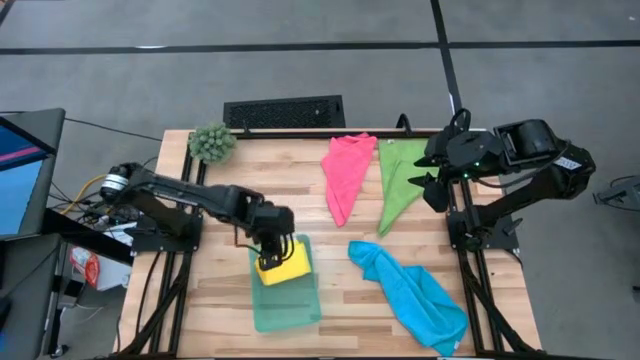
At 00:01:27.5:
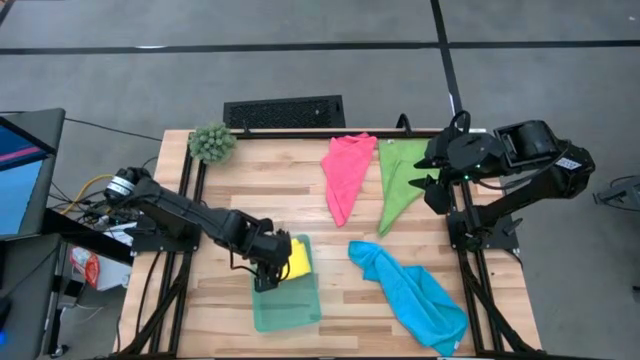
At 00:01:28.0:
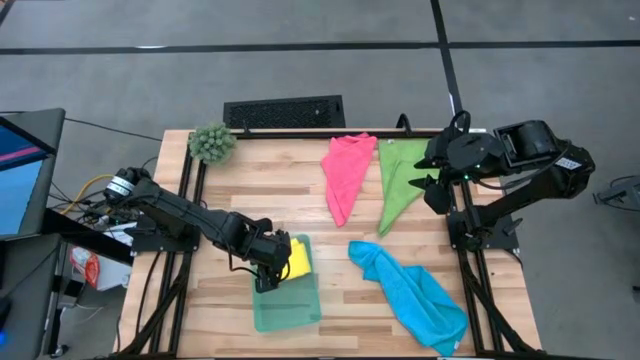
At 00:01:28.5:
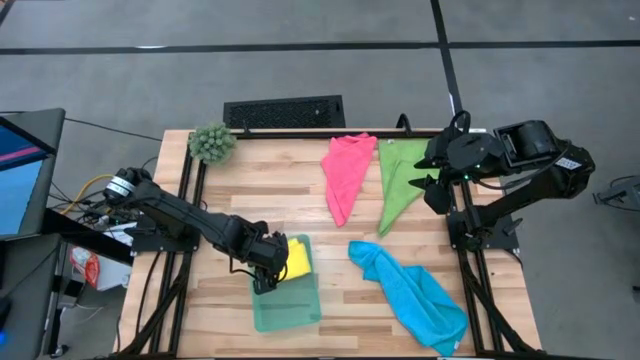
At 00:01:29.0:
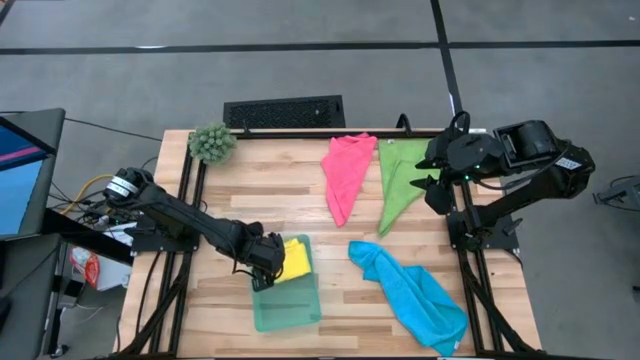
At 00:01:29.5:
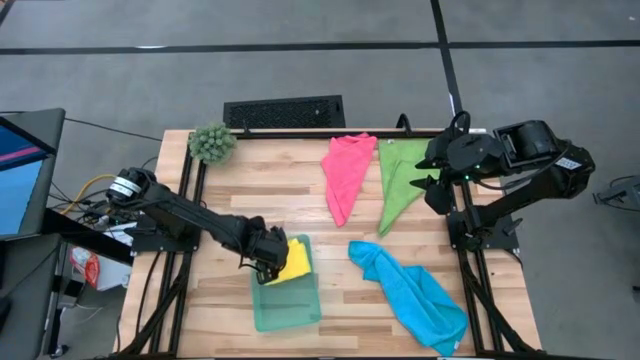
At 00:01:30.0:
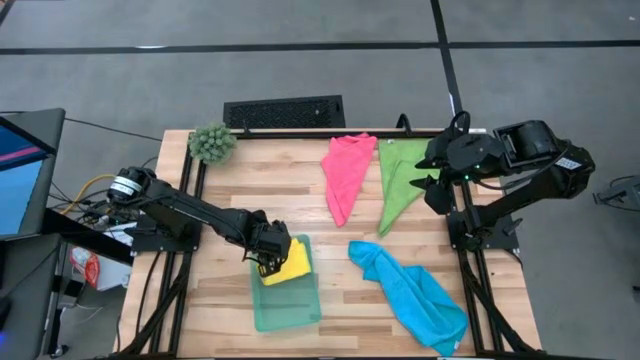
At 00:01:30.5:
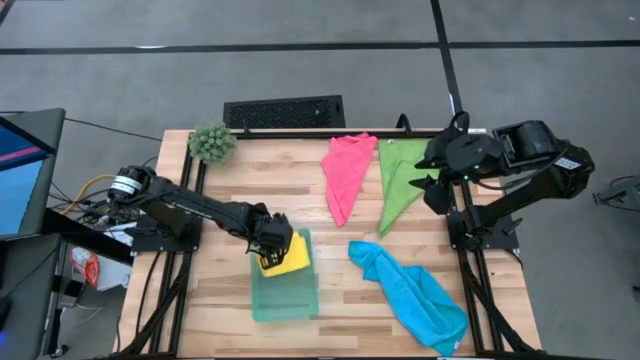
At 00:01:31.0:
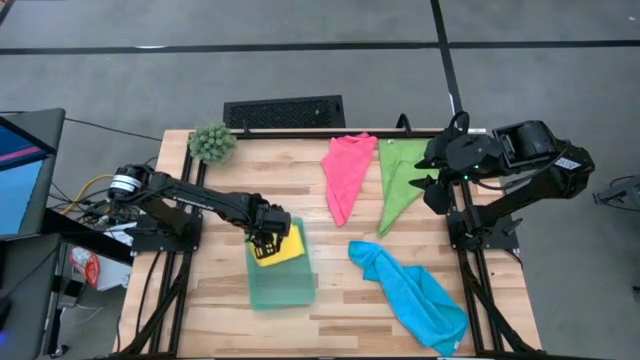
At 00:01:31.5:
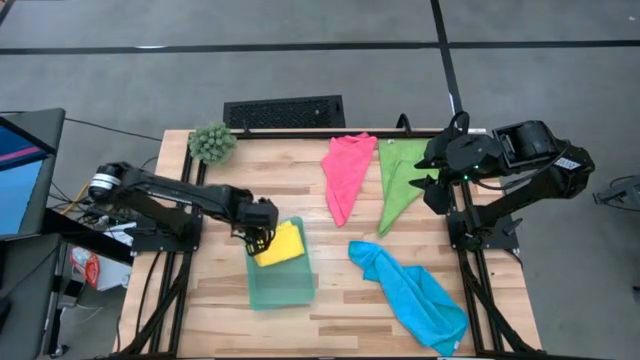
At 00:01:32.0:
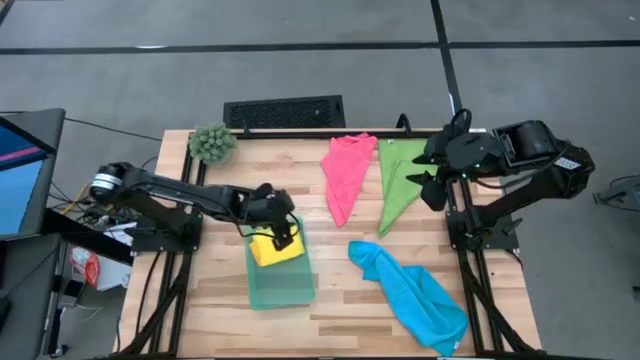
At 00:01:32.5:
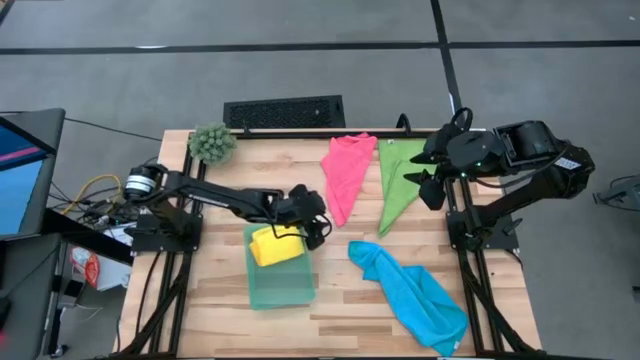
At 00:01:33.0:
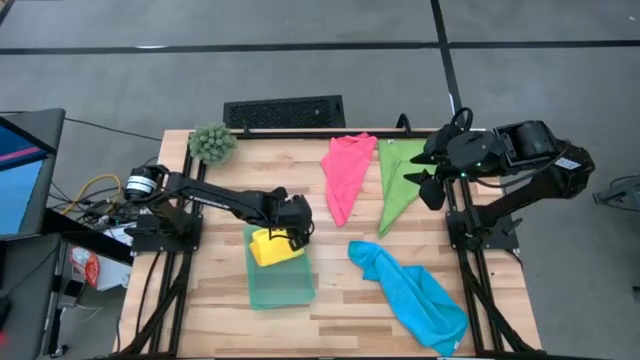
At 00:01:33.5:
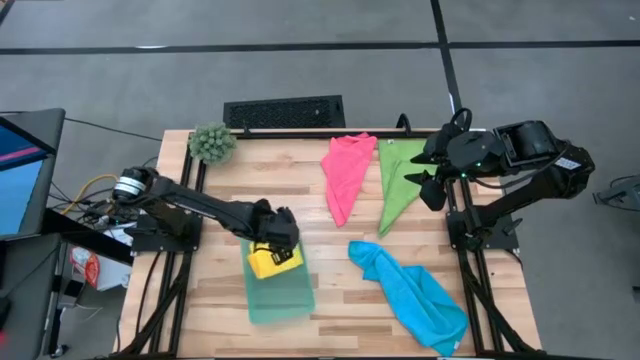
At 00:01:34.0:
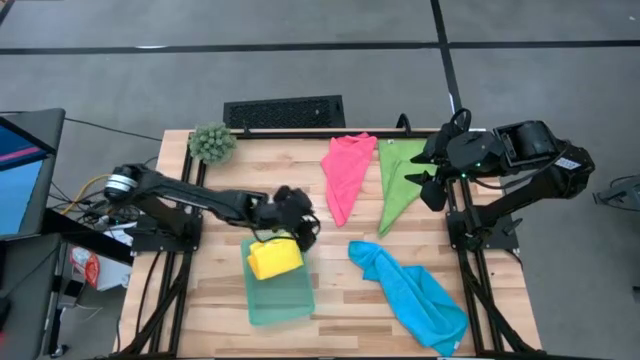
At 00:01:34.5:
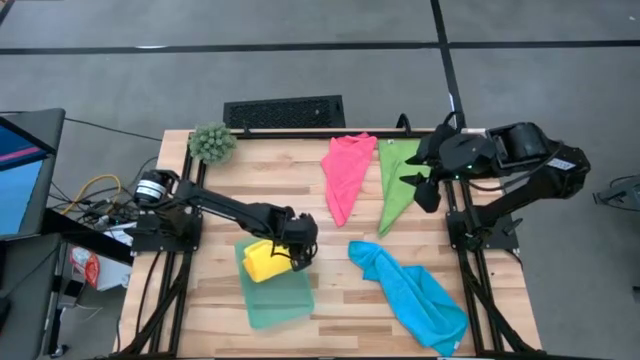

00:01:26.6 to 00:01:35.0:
Task: Fold microfiber towels
Adjust the green bin

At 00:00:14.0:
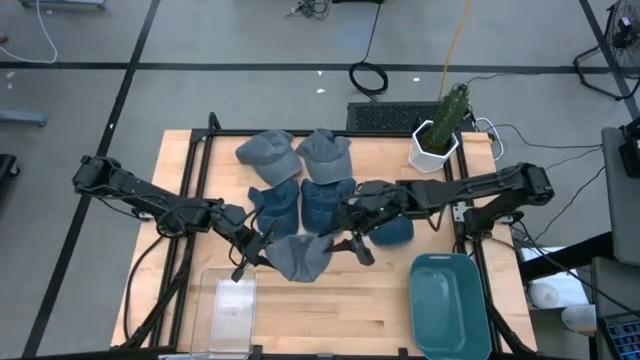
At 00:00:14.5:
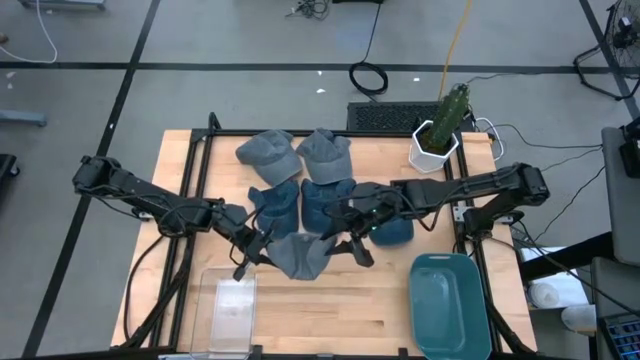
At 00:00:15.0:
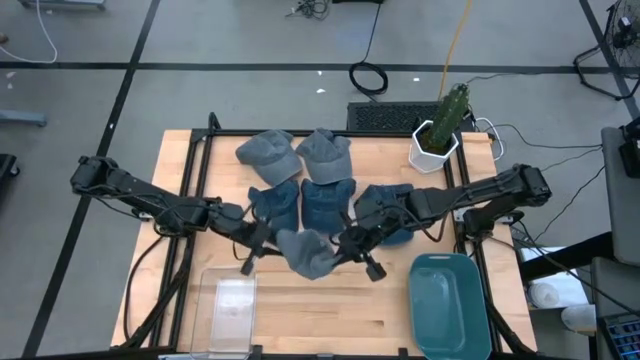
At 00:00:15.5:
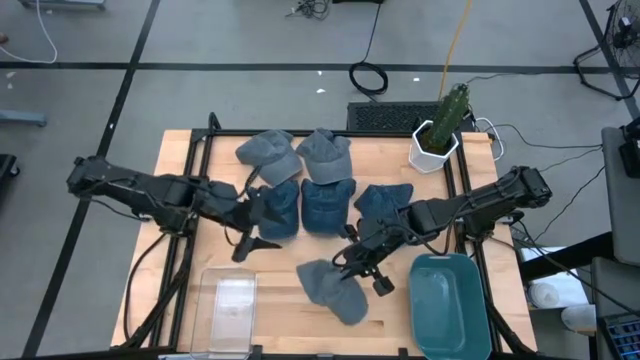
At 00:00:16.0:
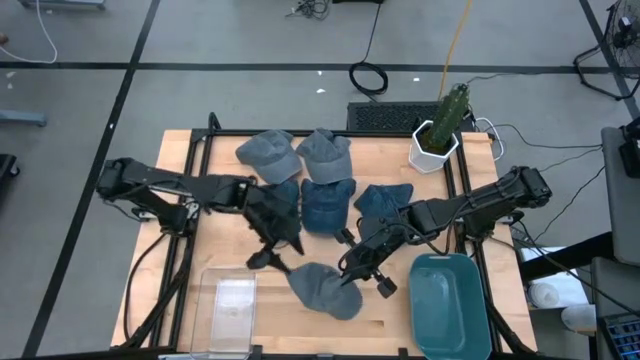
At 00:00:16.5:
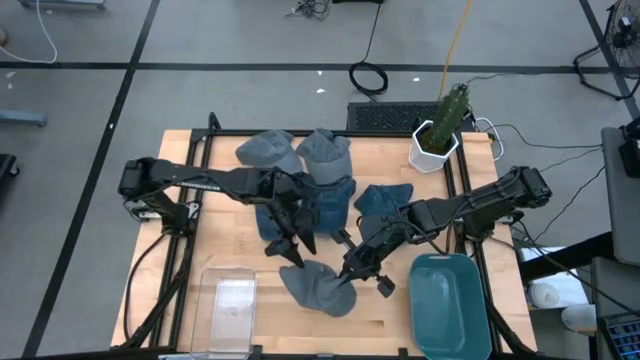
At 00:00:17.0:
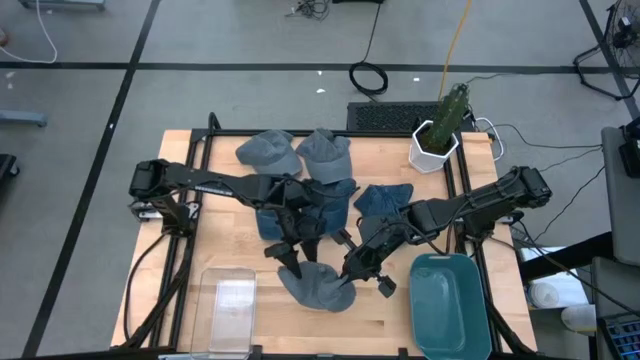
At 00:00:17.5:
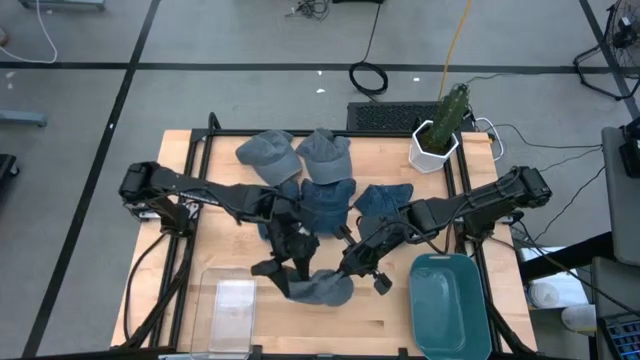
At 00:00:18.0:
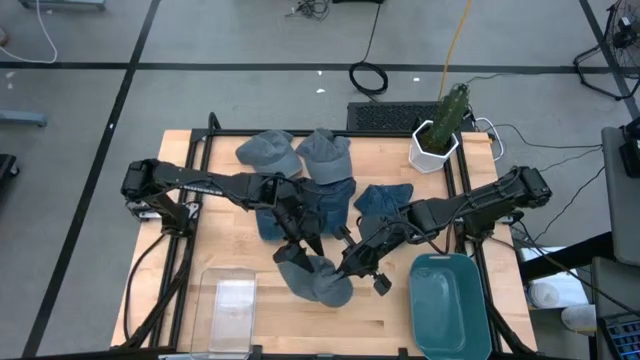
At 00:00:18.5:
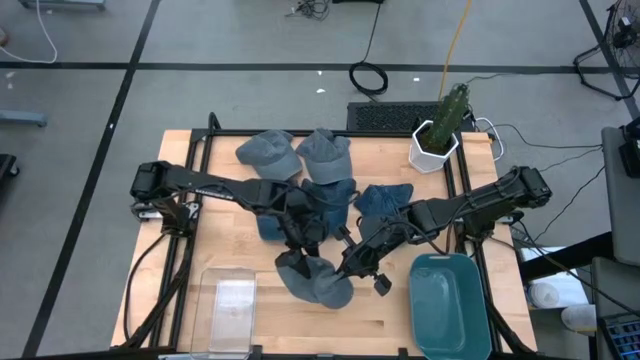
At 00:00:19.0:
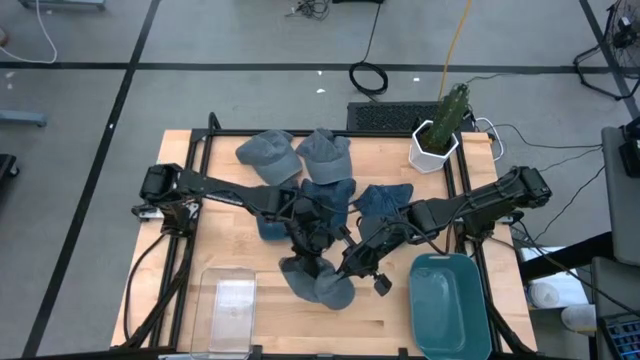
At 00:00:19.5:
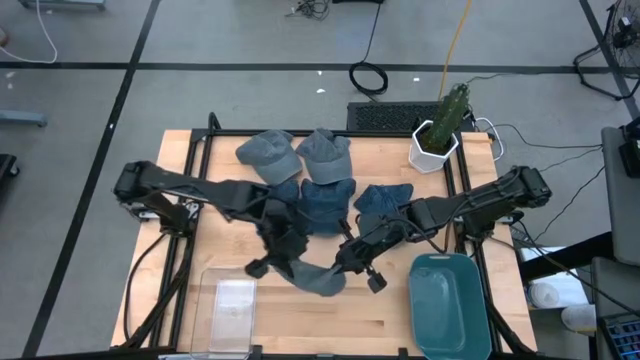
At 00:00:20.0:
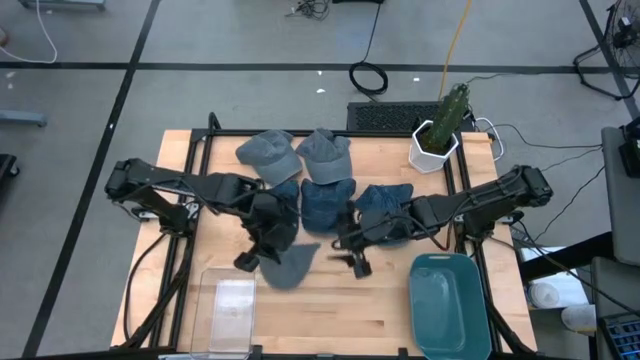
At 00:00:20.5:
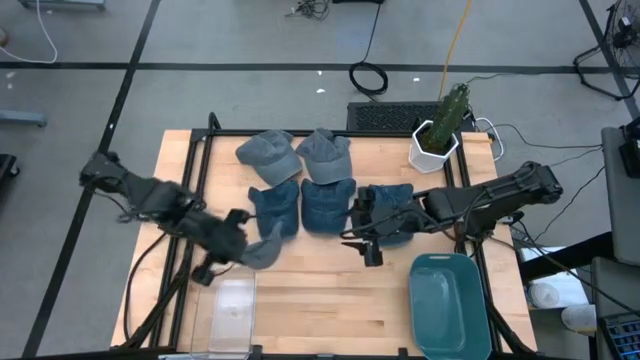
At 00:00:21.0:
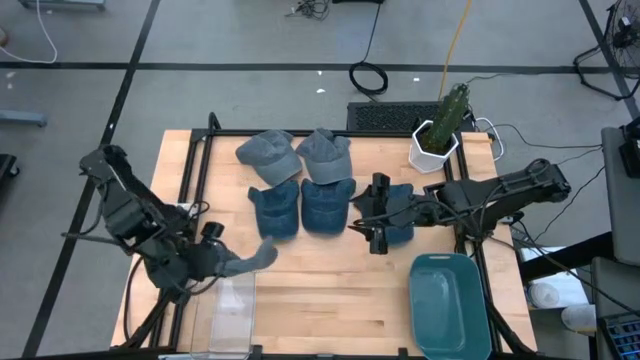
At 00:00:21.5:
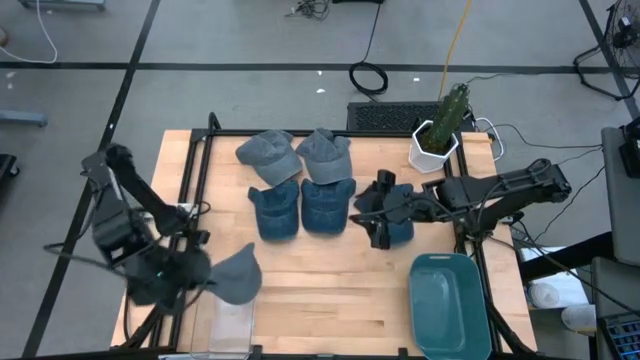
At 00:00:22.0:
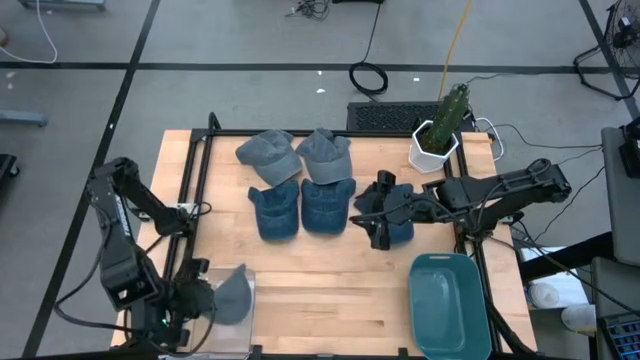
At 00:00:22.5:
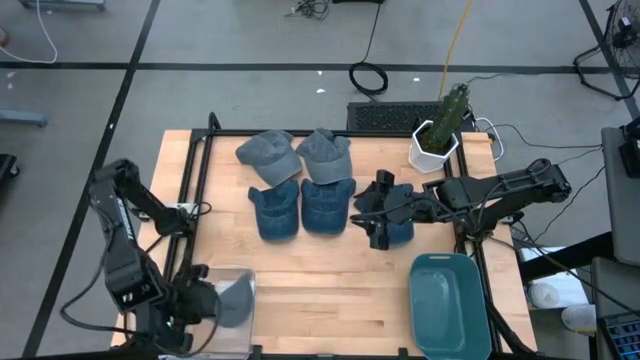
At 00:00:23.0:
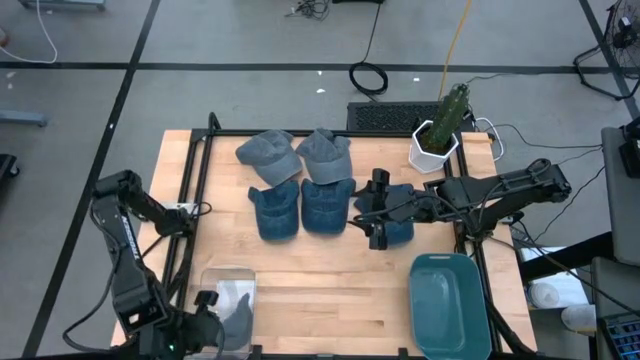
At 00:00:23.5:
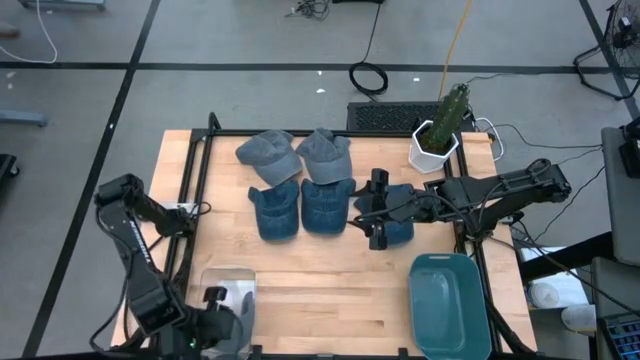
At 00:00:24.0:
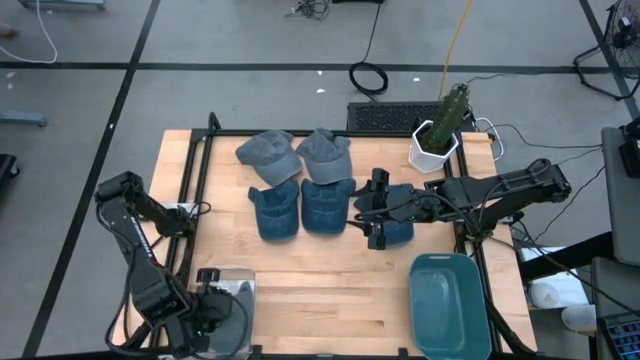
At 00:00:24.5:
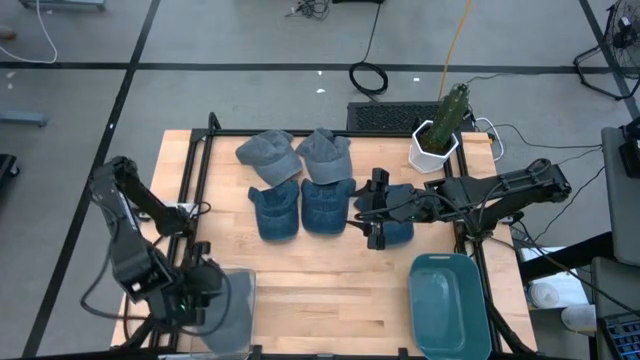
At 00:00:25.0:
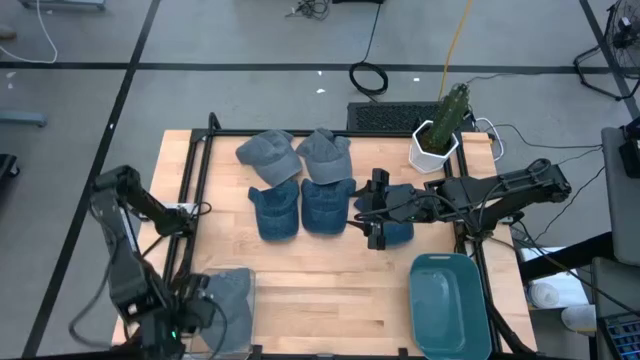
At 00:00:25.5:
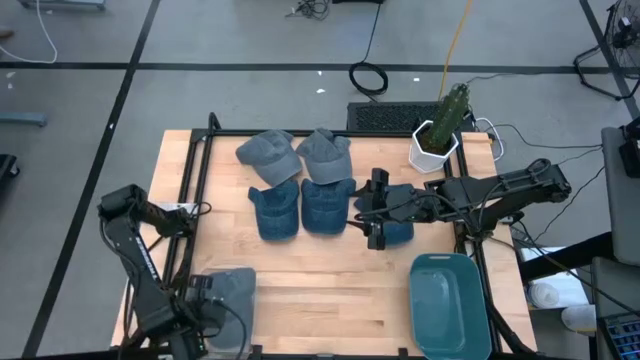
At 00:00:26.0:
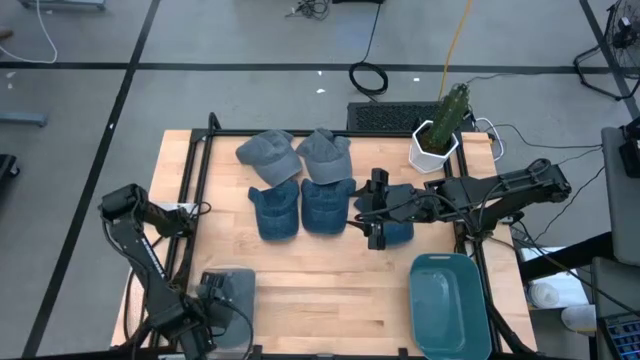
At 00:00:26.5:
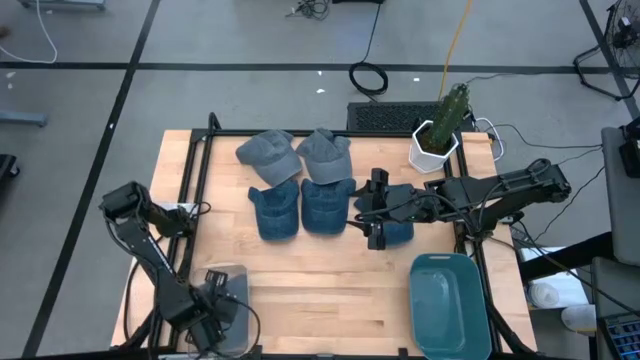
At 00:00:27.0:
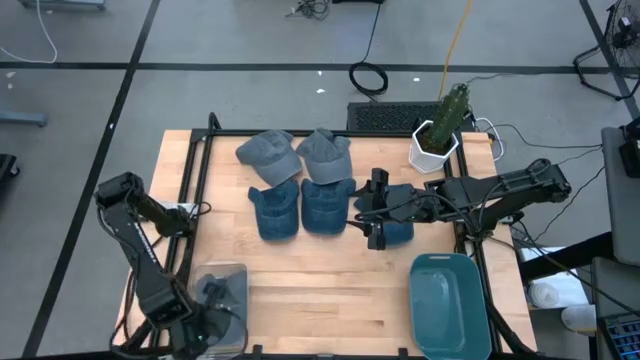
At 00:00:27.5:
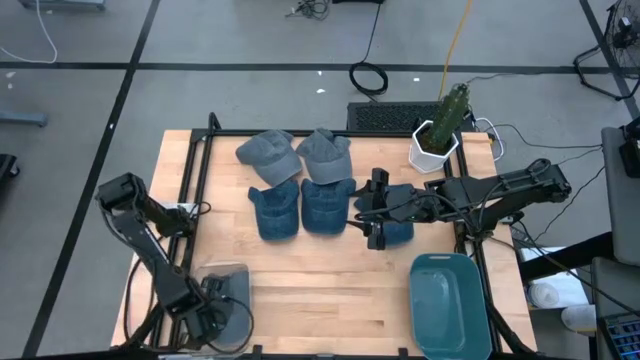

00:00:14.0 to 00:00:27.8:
Task: Pick & Place hat
Put the right gray cap into the transparent bin
